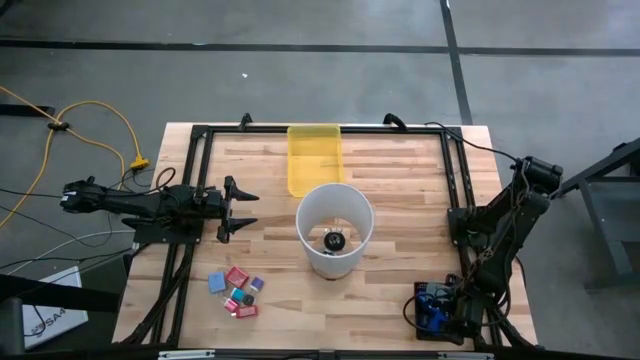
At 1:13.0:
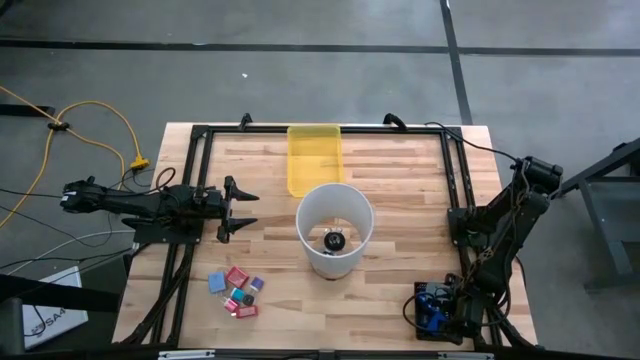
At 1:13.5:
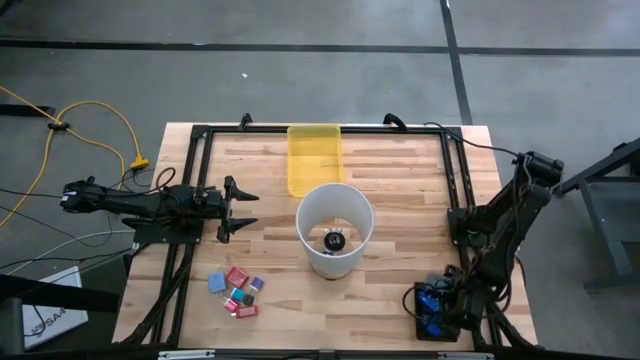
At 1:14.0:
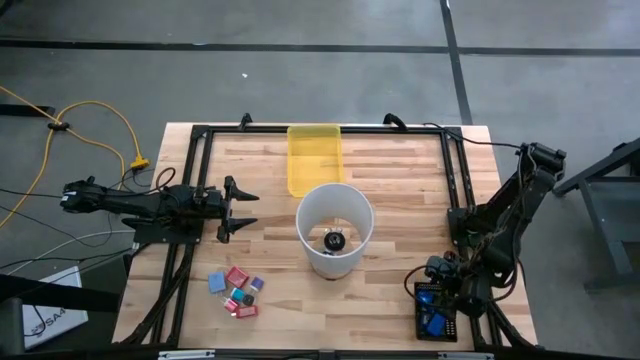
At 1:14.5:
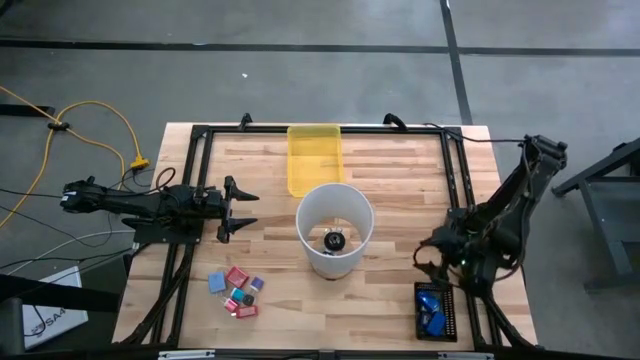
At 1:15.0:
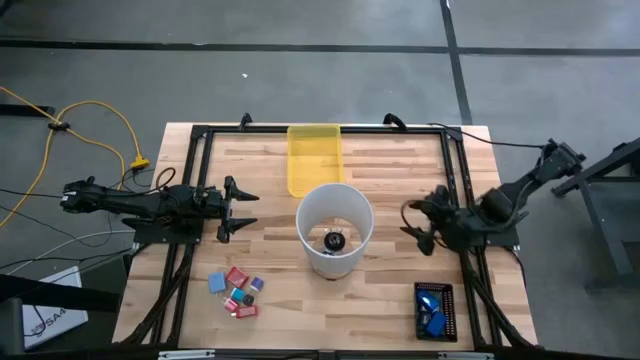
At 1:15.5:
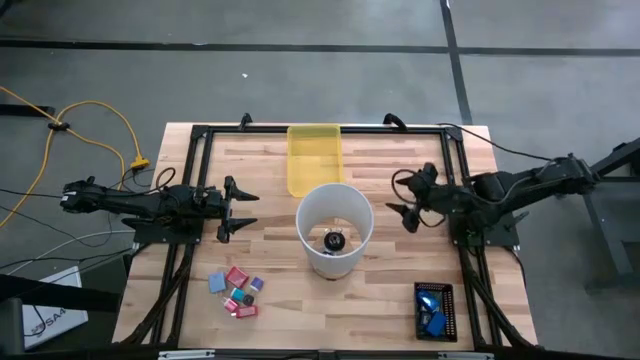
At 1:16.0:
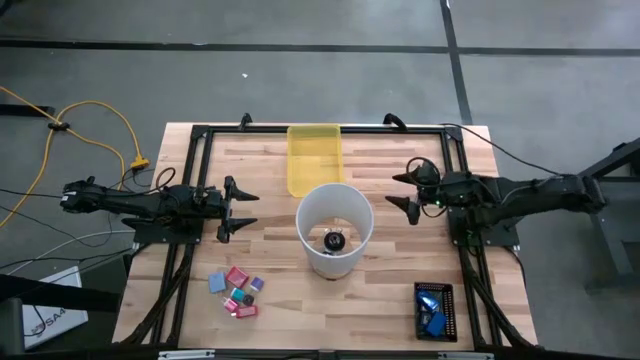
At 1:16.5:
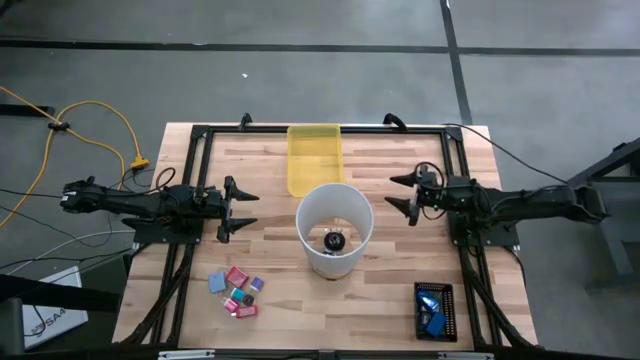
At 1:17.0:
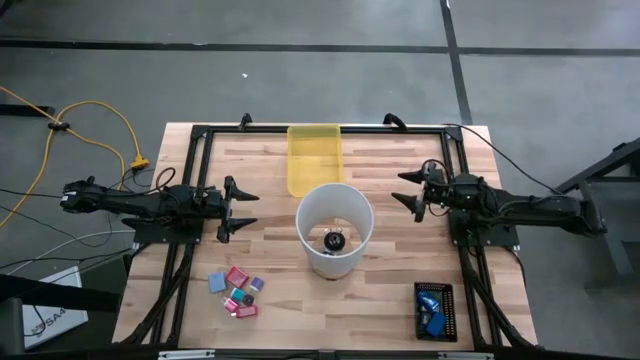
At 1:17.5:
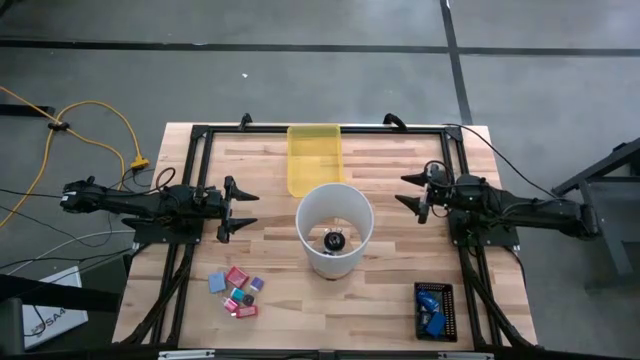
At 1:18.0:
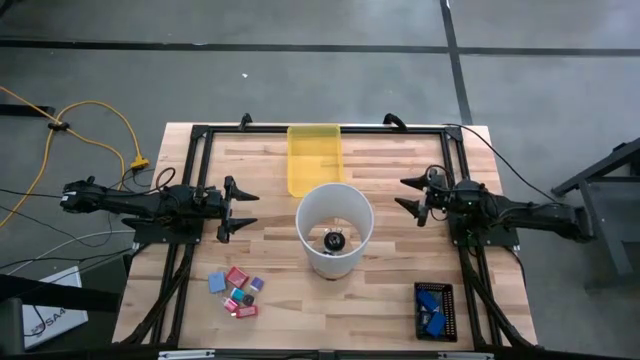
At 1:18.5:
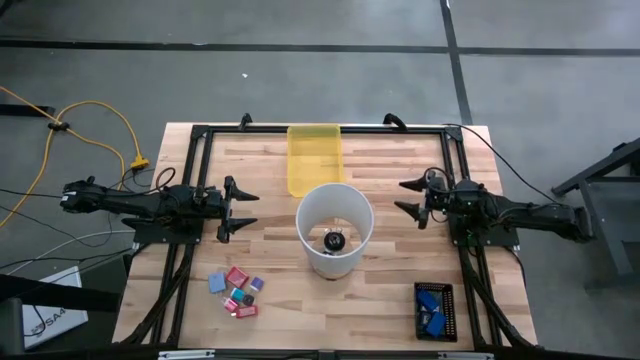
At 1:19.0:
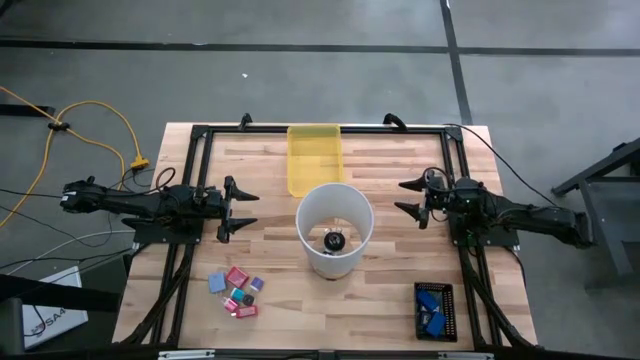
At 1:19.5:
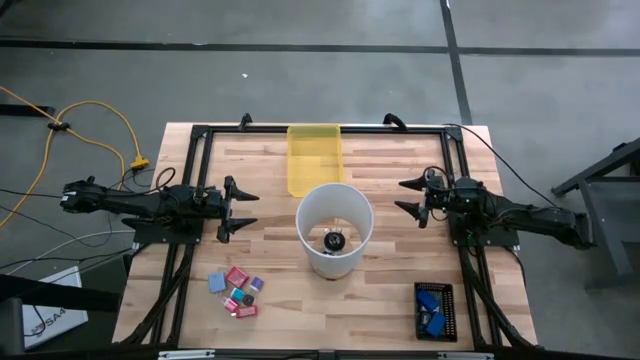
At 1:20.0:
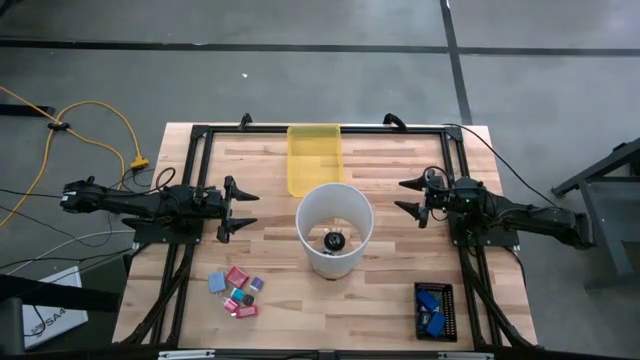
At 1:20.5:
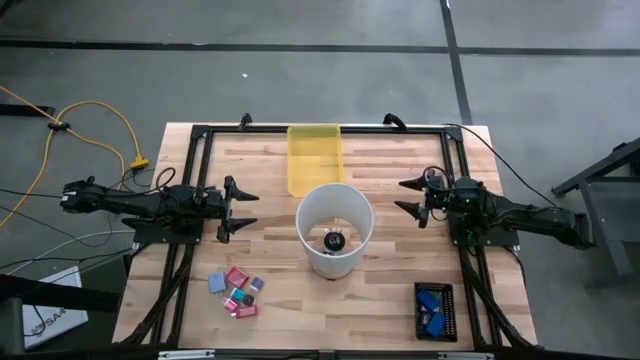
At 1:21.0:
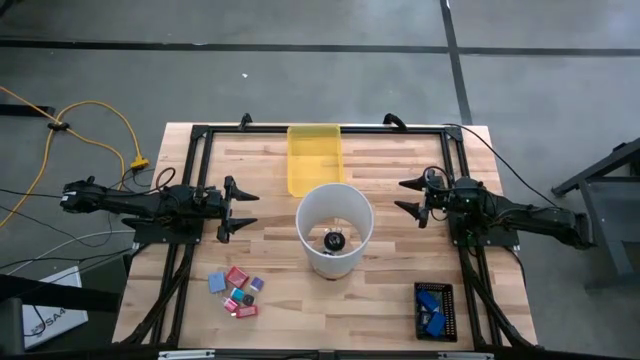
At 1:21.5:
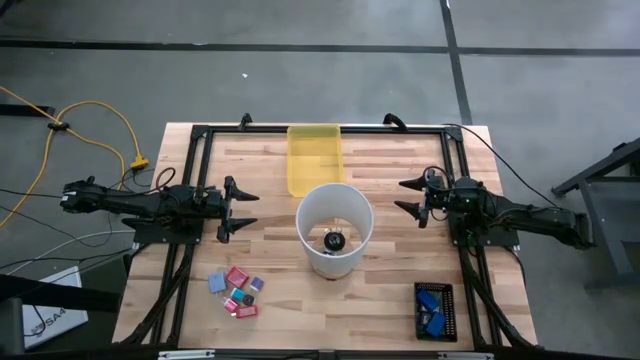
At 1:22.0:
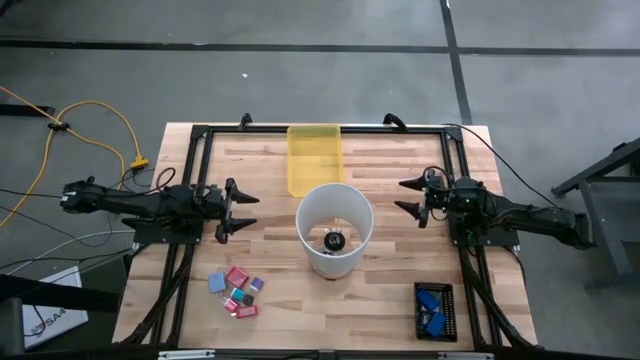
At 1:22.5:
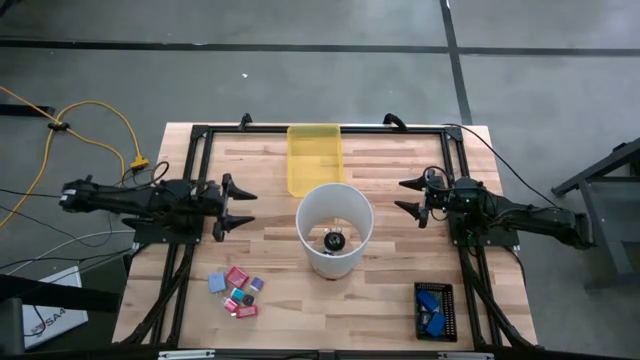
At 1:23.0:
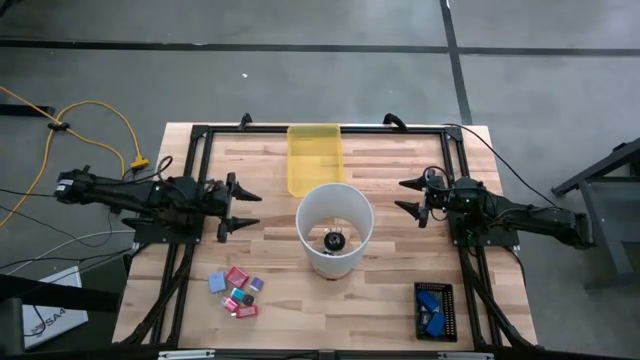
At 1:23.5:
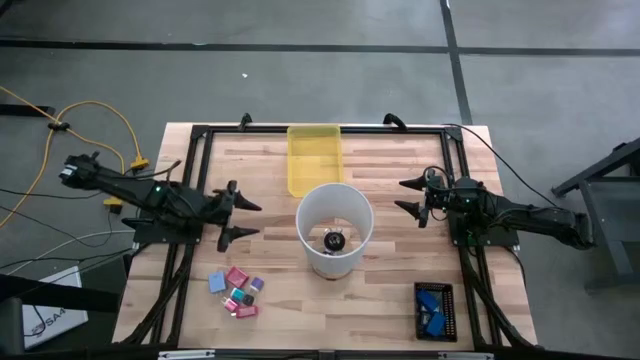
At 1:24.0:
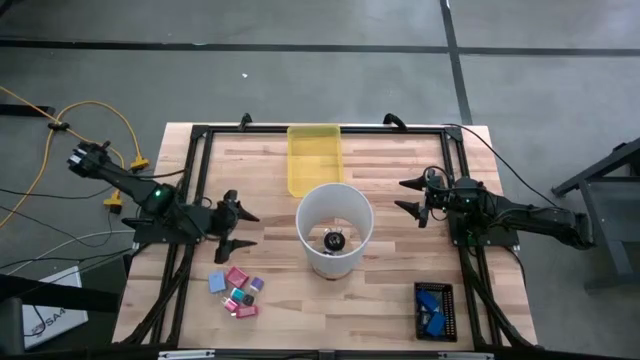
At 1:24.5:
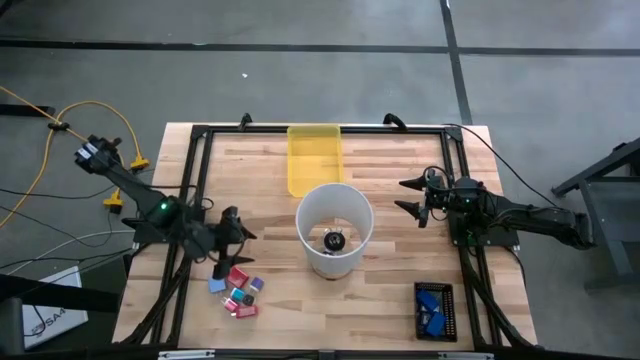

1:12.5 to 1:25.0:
Task: Pick & Place Office items
Put the bottom red charger adapter into the yellow bin
